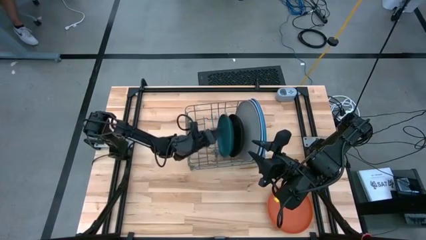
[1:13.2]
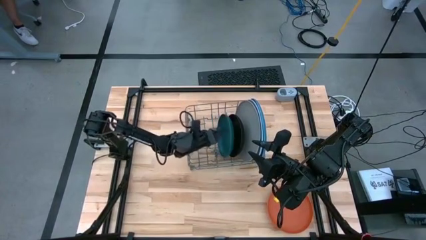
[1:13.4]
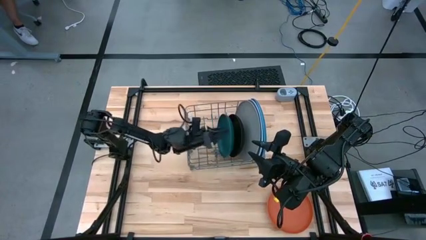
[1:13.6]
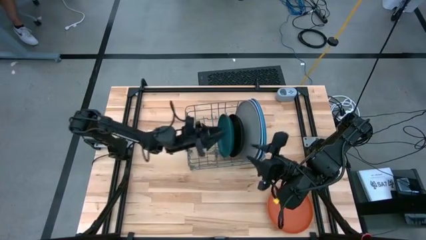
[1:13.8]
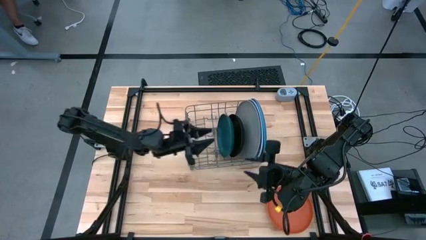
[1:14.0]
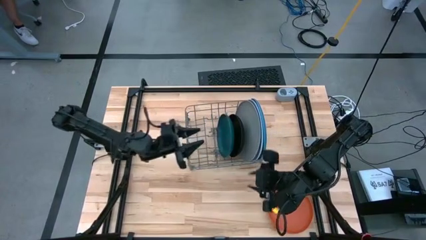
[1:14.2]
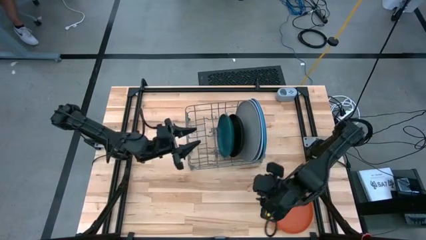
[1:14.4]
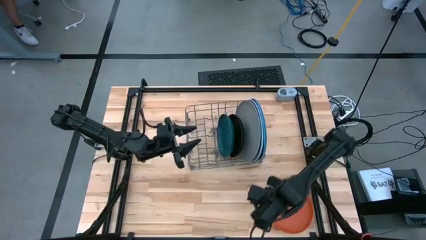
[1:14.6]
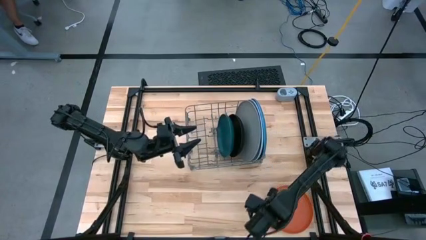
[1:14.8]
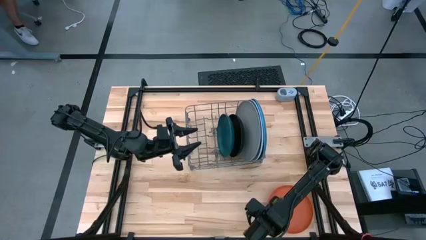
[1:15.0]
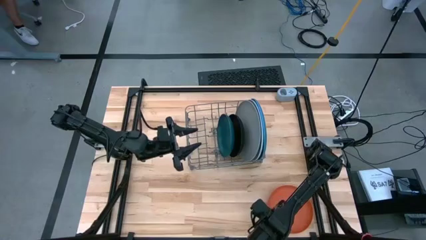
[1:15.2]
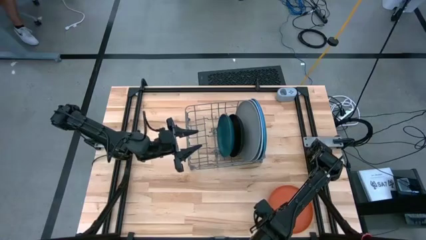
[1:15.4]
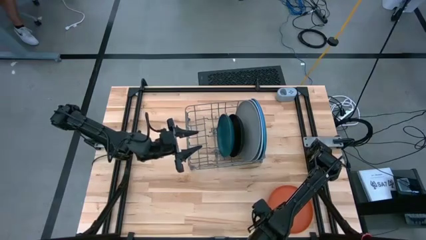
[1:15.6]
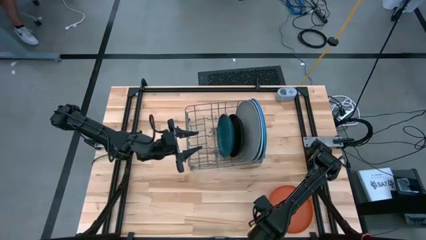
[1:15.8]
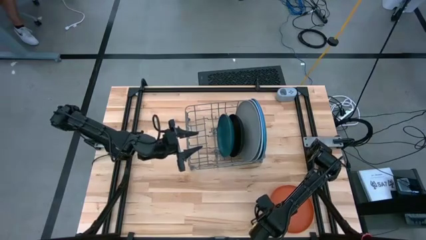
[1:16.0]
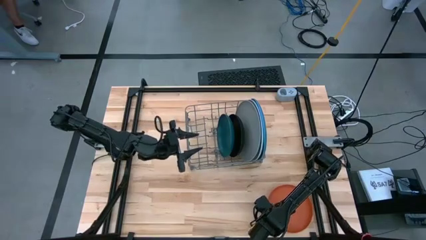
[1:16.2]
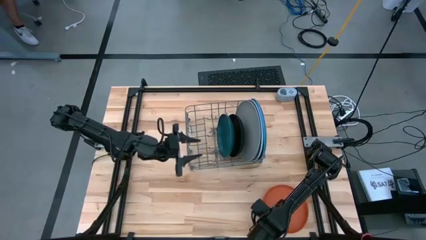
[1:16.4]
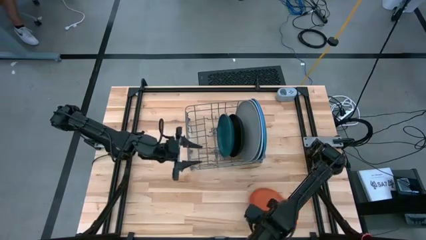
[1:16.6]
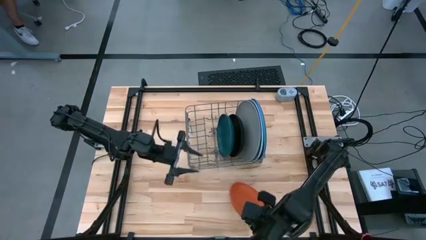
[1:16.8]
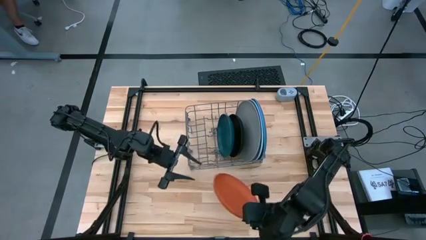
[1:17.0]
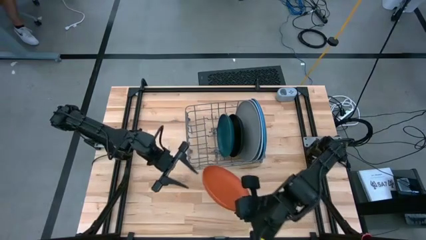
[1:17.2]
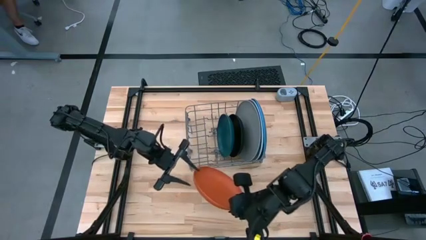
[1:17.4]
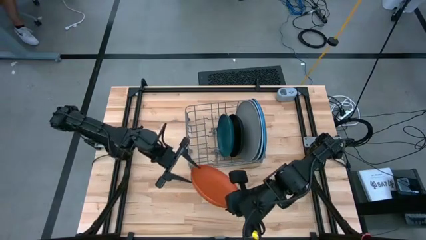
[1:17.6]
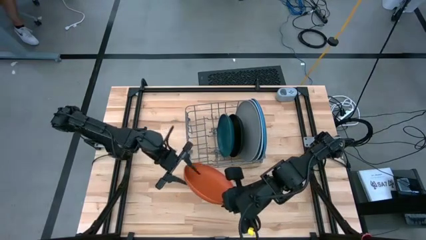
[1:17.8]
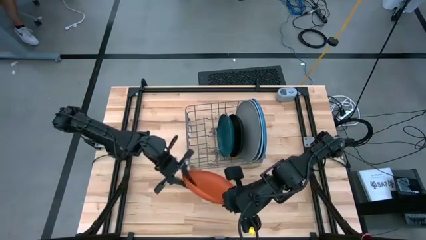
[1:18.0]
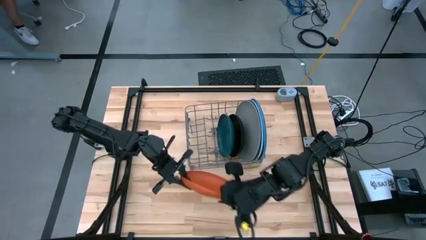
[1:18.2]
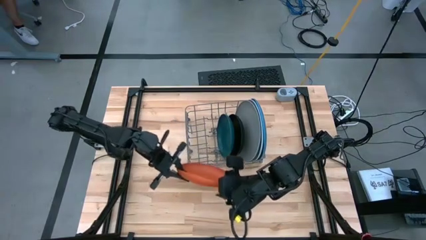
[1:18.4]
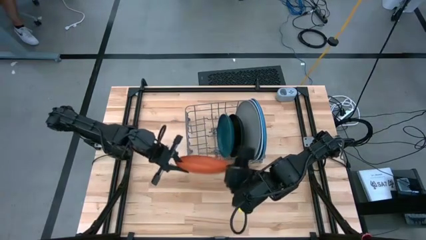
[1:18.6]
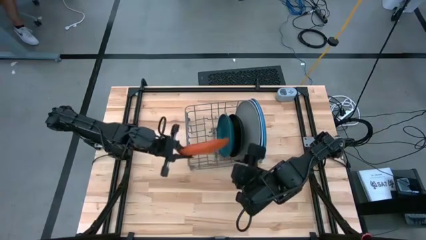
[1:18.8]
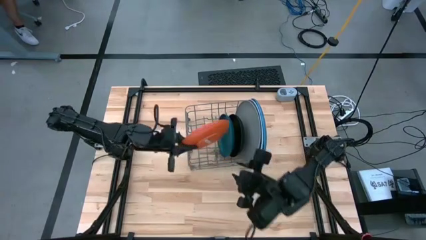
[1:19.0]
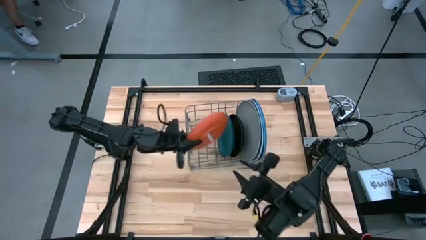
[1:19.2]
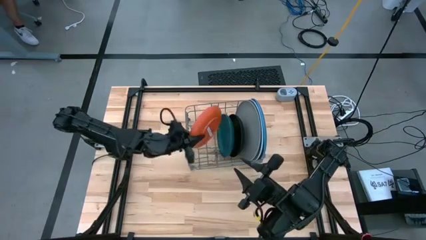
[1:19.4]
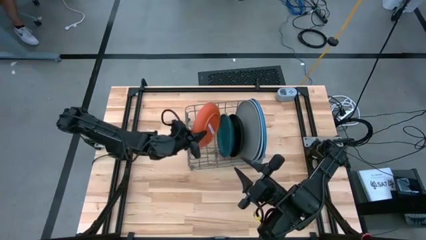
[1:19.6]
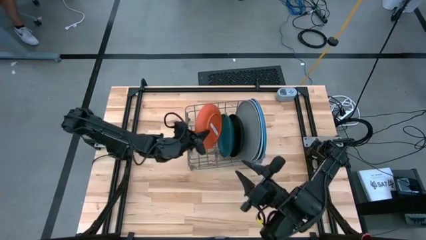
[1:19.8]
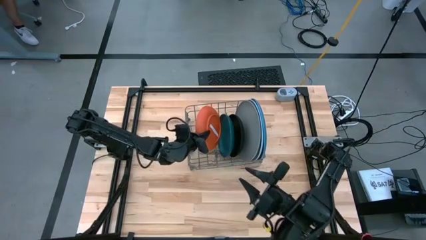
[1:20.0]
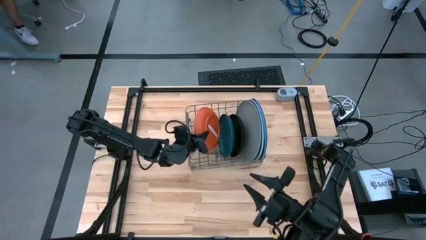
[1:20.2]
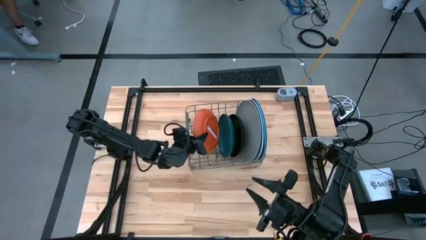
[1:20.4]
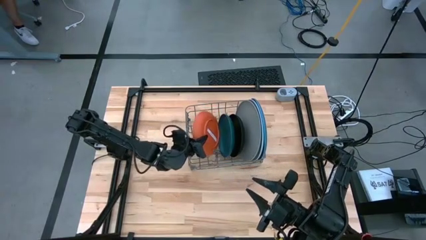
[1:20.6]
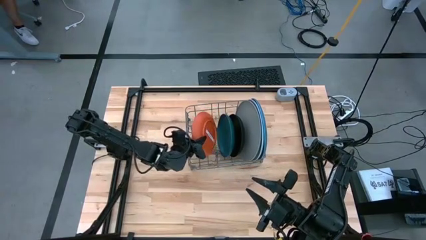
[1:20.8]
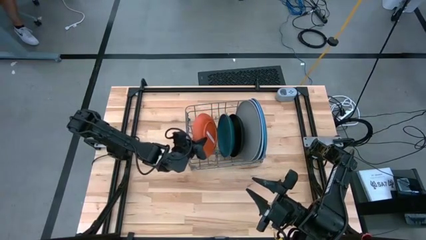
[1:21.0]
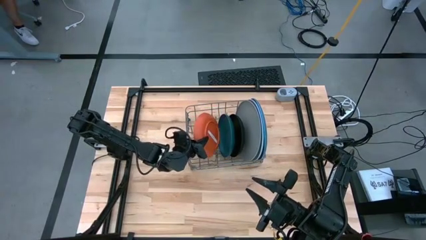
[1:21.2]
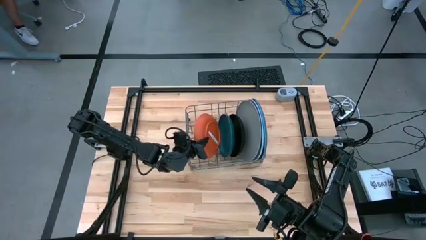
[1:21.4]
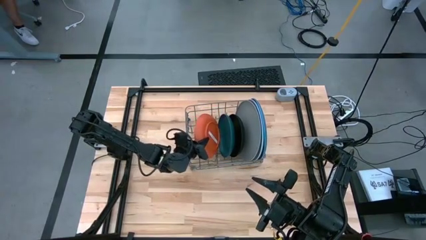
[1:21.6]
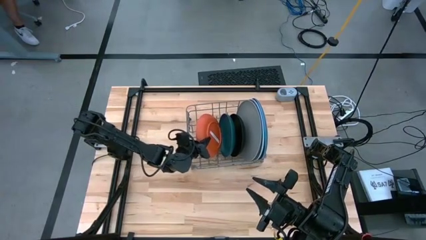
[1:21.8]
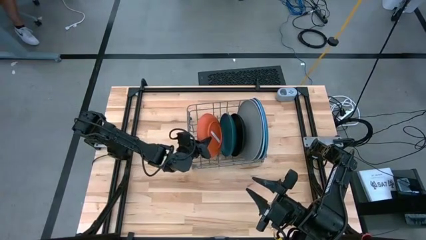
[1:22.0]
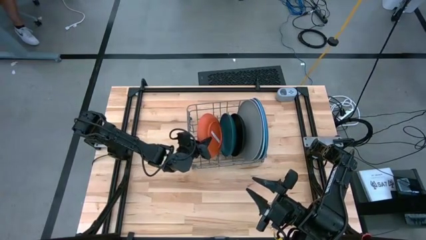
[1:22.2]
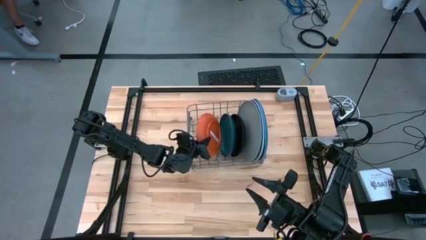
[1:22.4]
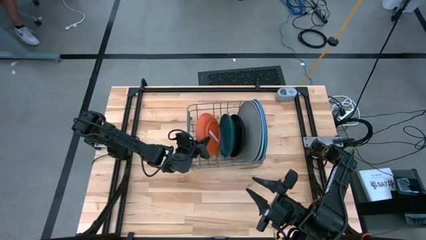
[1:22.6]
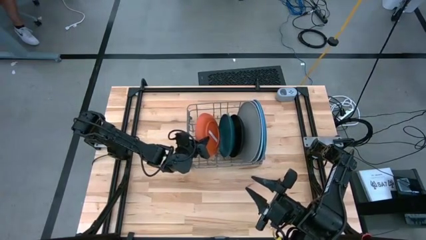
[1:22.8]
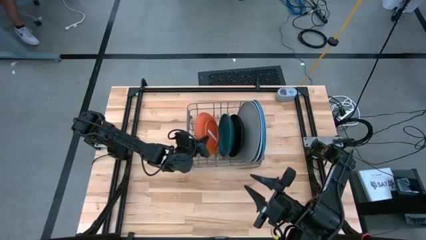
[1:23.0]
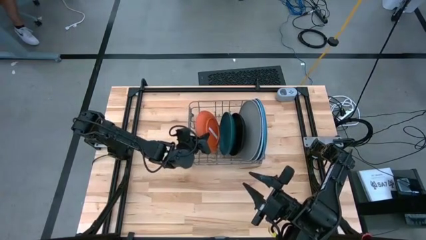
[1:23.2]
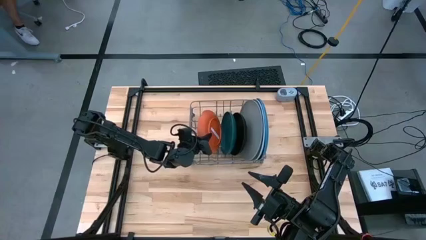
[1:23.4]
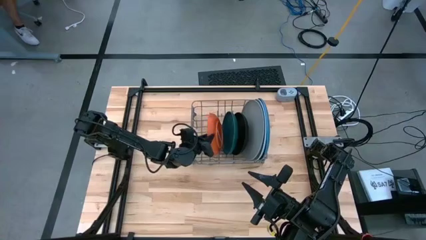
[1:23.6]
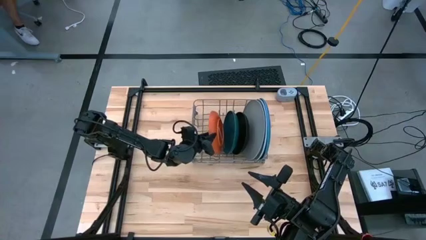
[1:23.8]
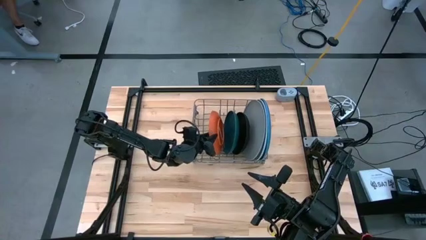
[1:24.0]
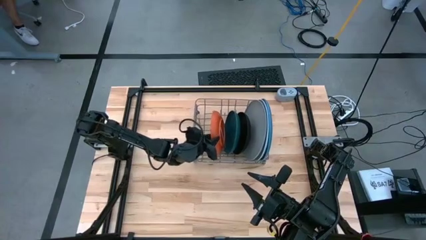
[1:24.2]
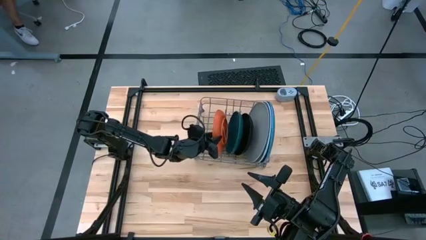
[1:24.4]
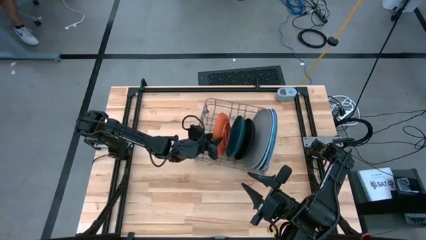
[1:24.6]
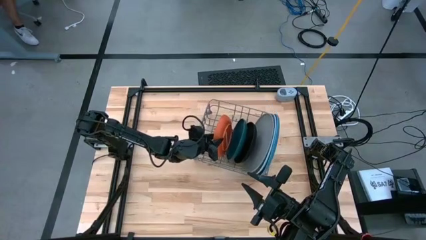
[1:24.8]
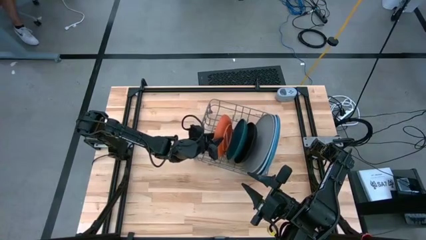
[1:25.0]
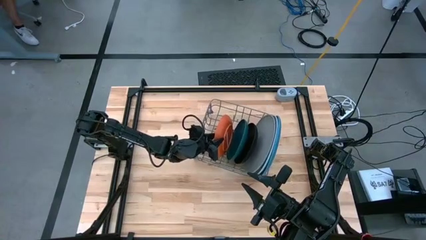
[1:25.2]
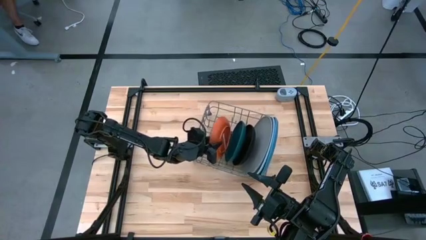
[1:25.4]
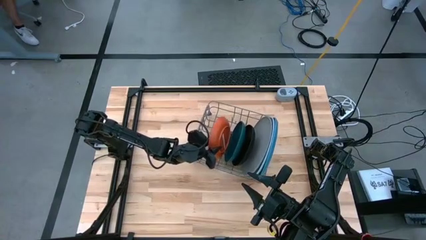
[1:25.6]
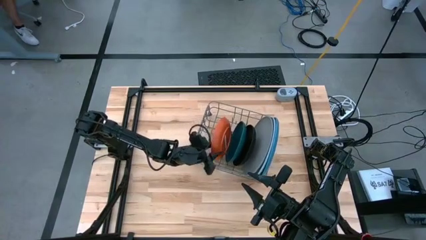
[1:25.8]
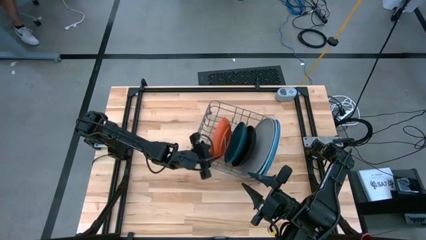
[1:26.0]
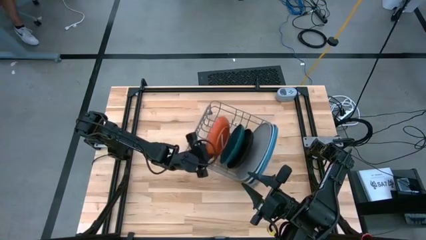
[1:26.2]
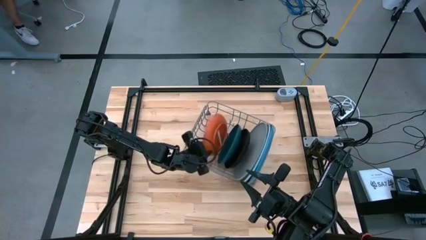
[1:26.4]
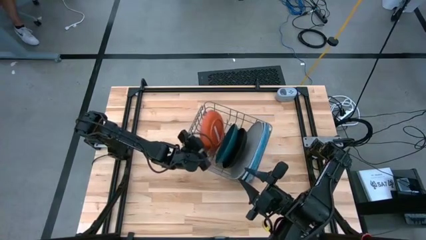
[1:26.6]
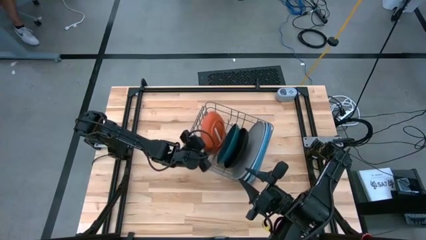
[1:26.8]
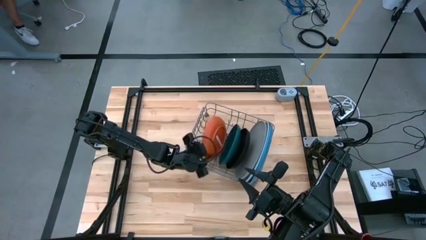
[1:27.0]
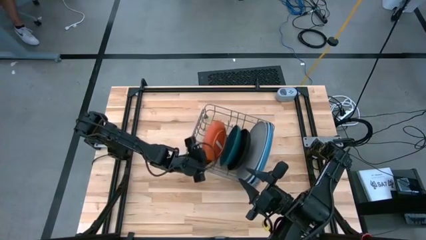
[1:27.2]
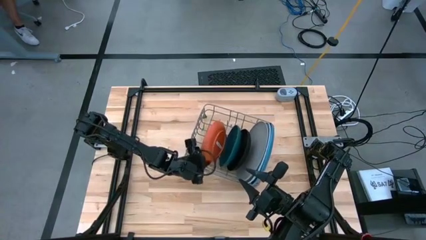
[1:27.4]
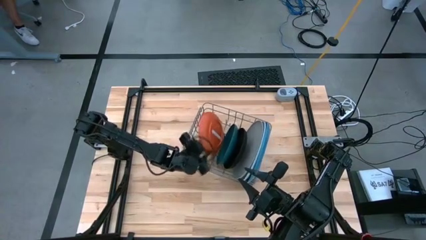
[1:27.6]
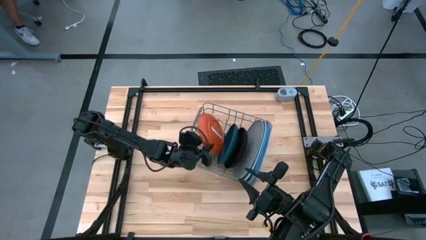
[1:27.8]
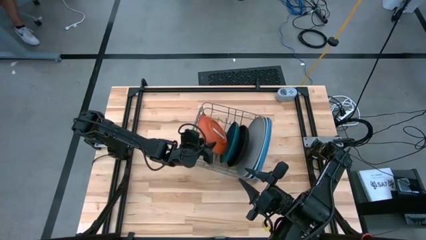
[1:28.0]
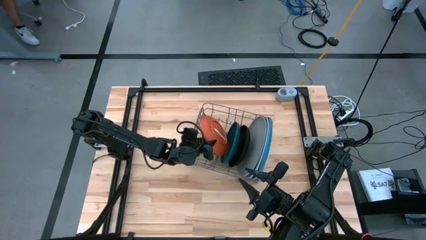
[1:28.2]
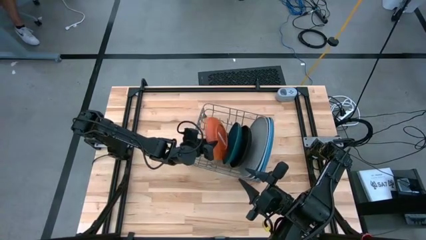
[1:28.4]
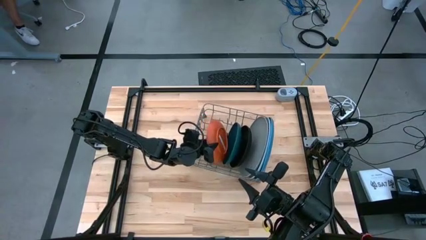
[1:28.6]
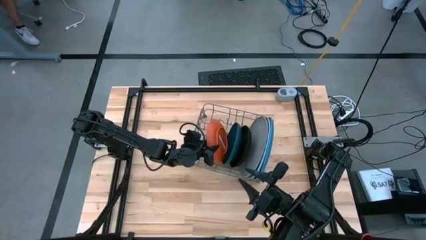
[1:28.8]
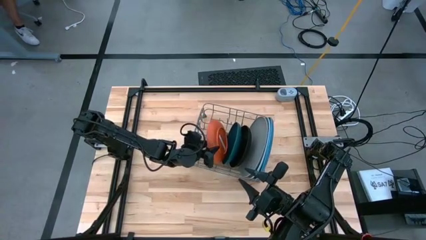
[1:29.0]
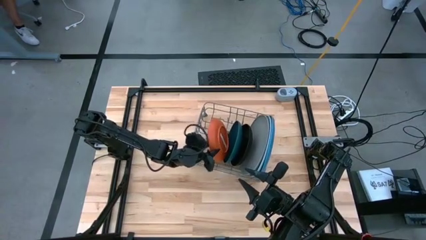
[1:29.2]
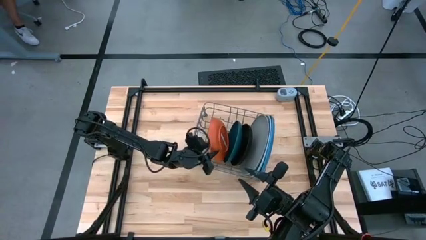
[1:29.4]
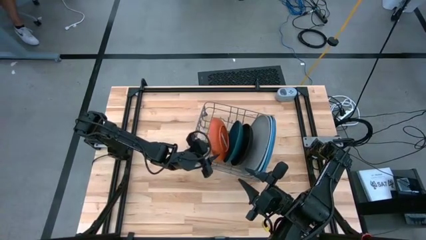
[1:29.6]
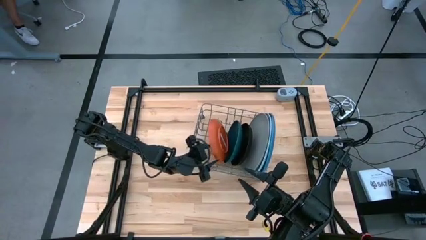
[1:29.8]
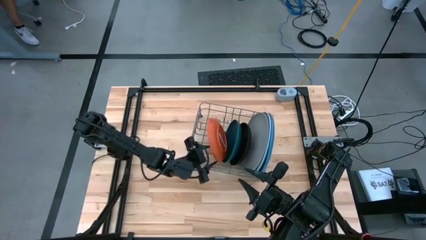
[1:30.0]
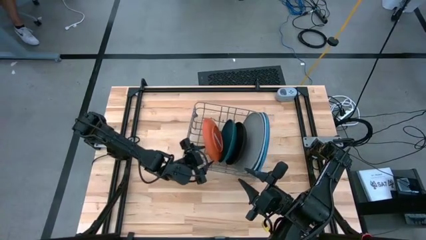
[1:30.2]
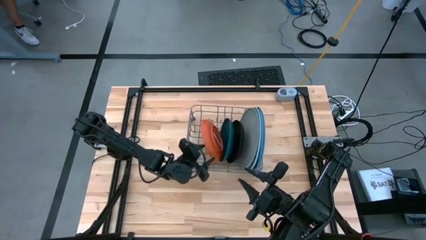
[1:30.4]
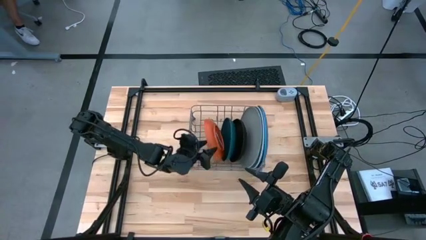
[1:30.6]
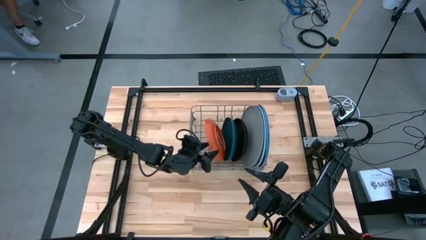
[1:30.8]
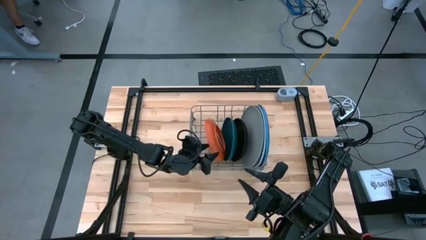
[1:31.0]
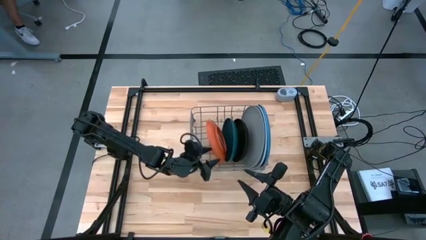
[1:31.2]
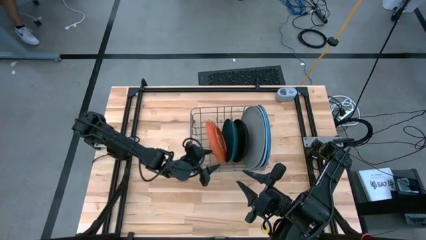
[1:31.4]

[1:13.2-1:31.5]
Task: Sort dishes
Put the orange plate into the dish rack
